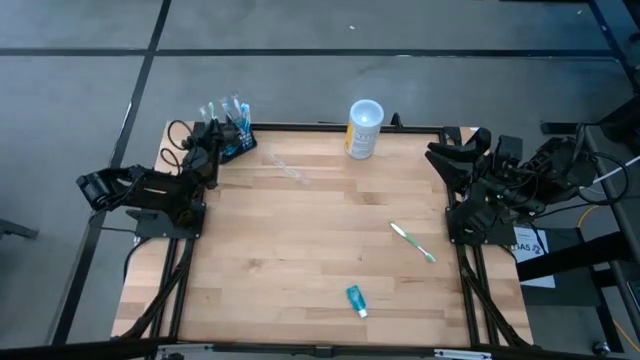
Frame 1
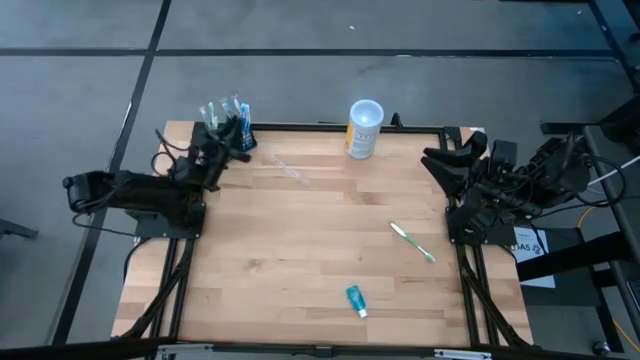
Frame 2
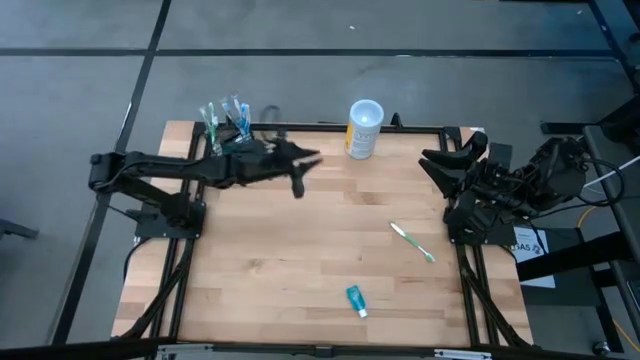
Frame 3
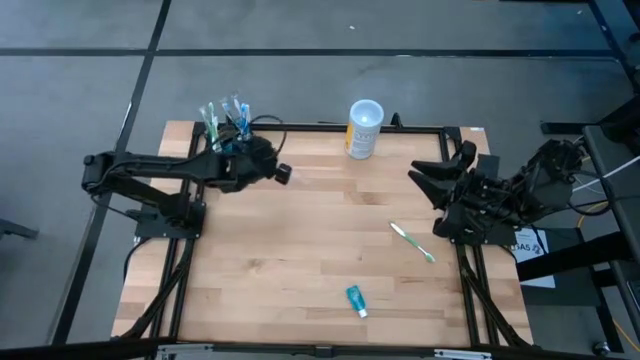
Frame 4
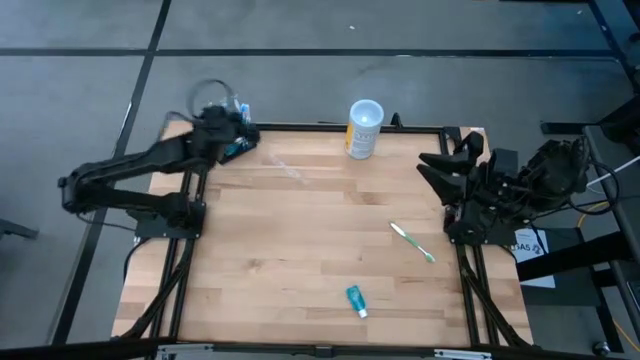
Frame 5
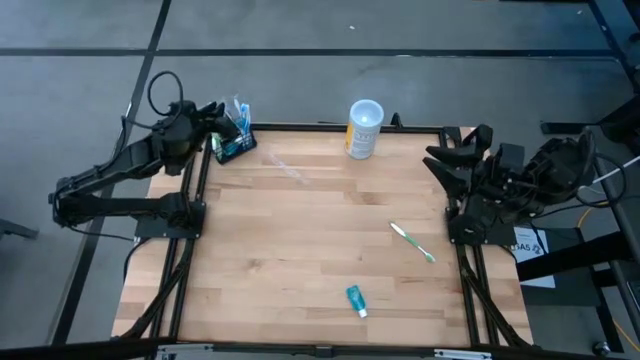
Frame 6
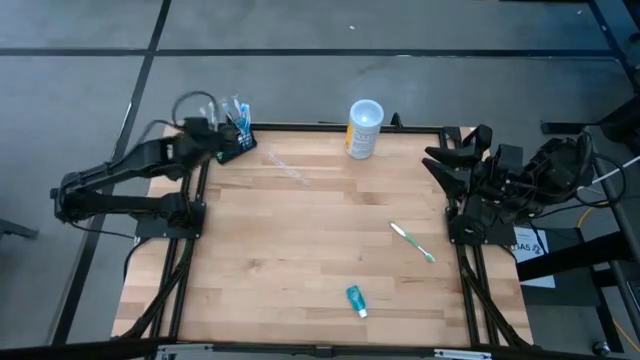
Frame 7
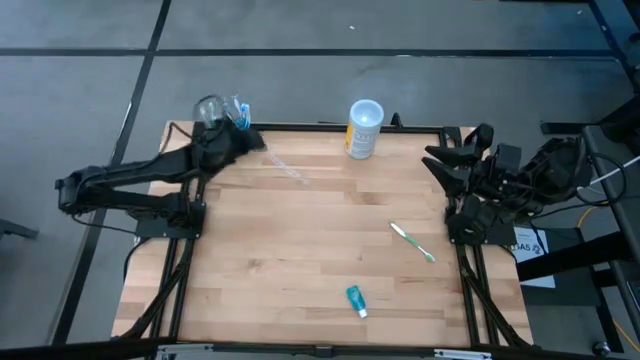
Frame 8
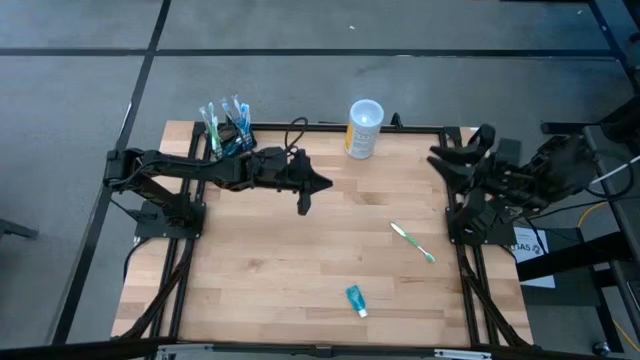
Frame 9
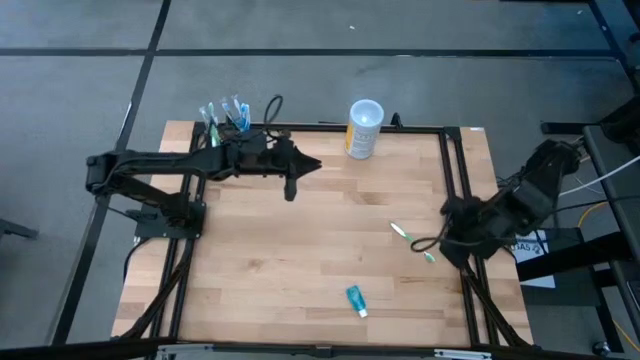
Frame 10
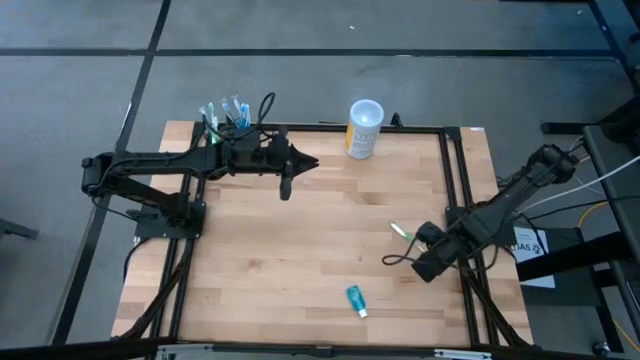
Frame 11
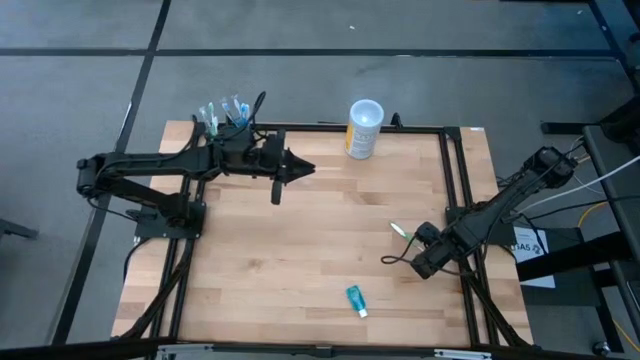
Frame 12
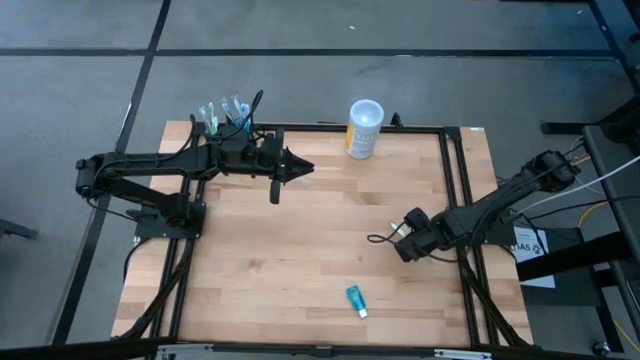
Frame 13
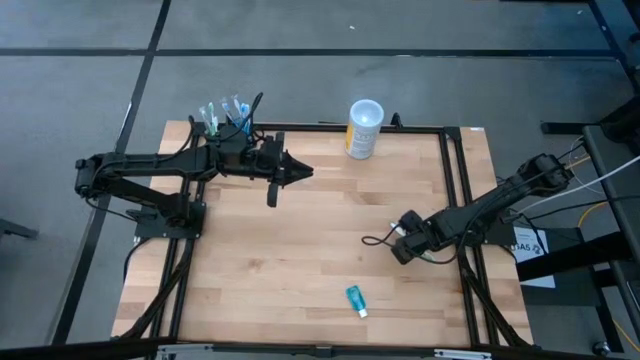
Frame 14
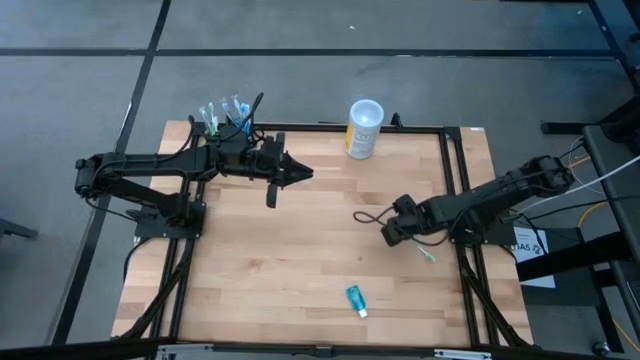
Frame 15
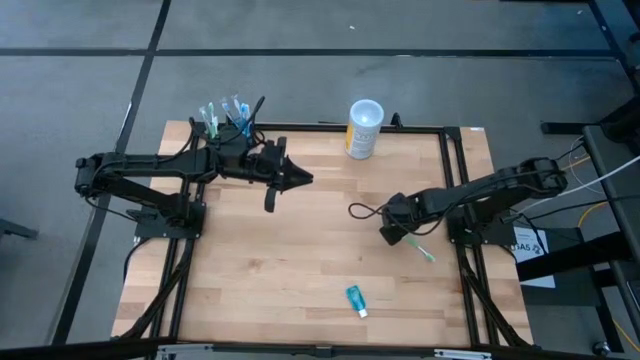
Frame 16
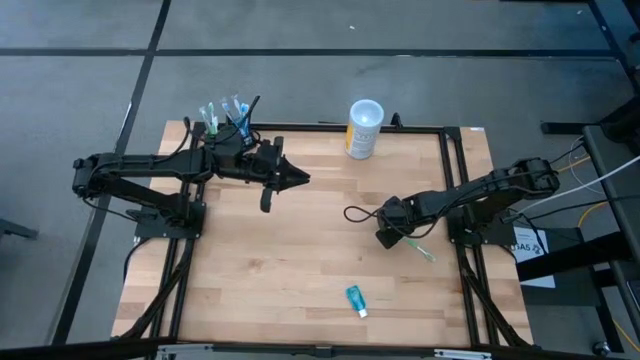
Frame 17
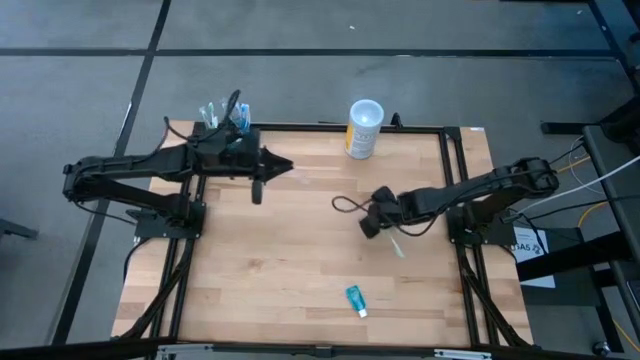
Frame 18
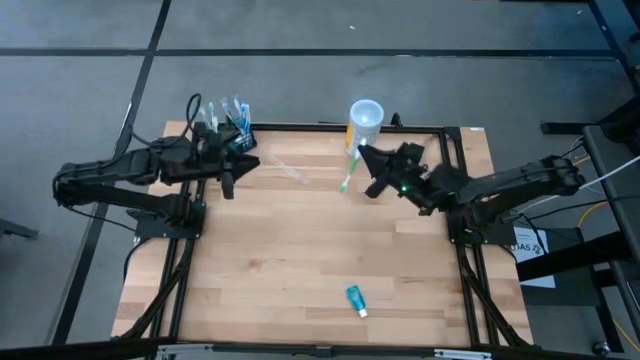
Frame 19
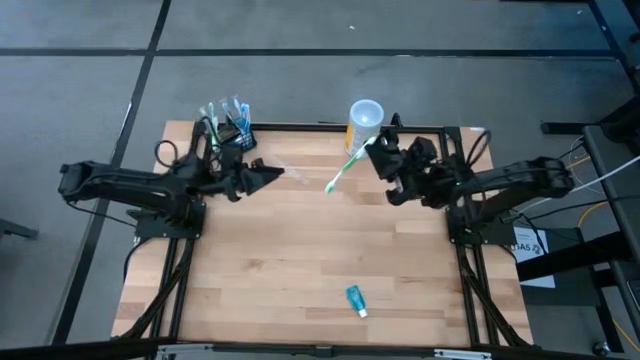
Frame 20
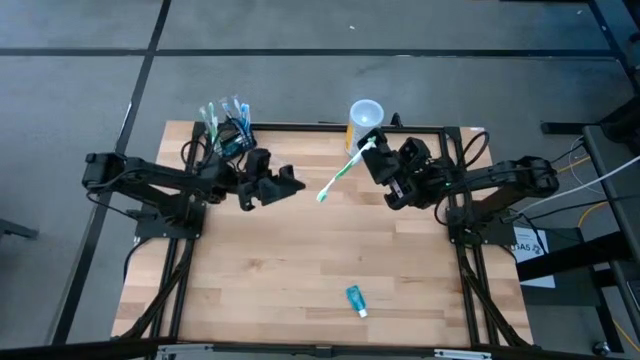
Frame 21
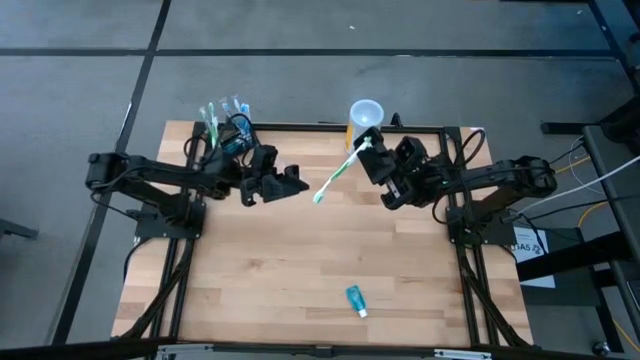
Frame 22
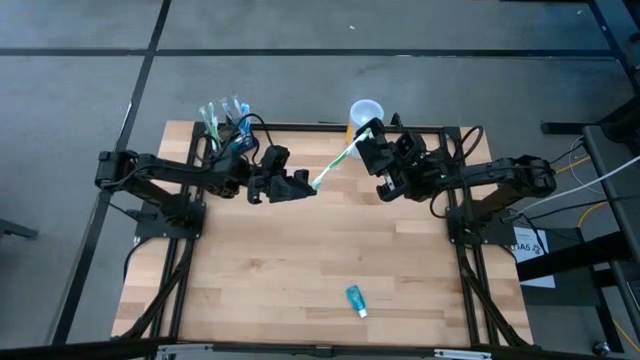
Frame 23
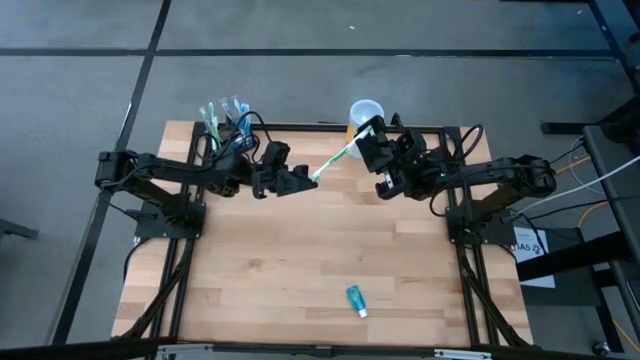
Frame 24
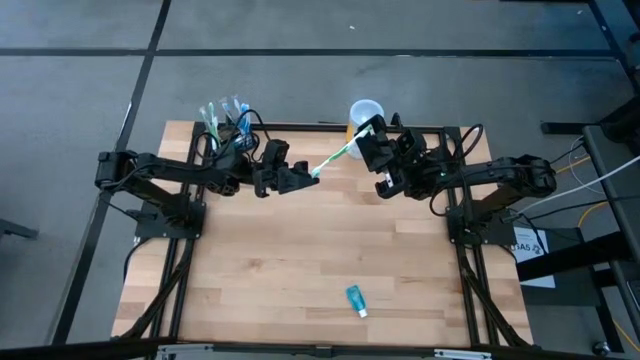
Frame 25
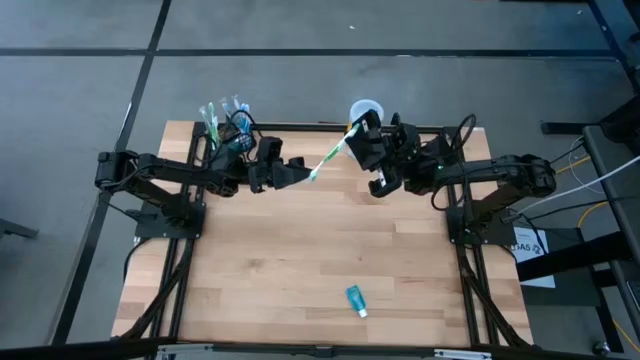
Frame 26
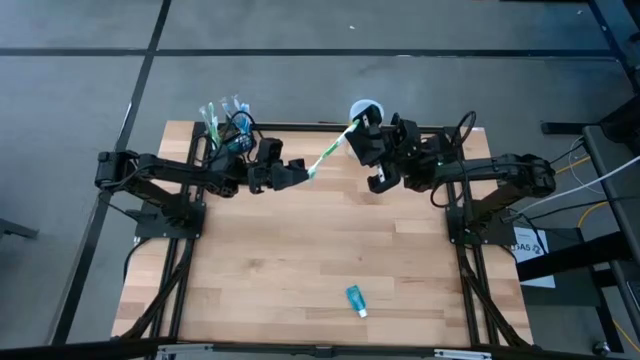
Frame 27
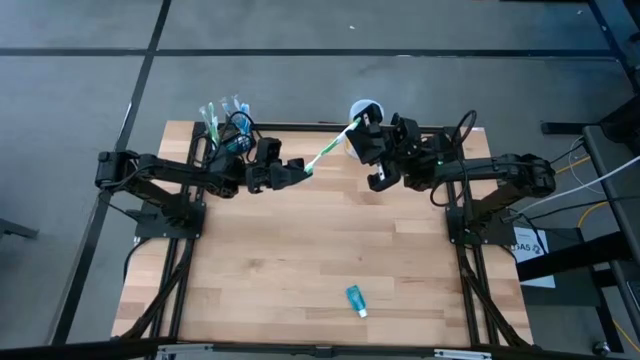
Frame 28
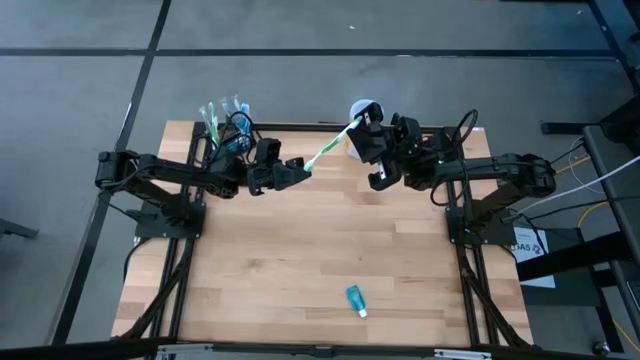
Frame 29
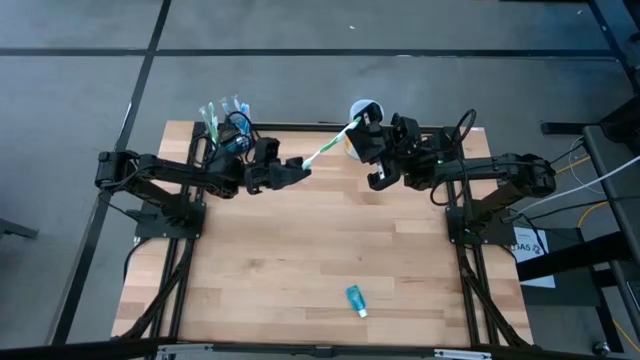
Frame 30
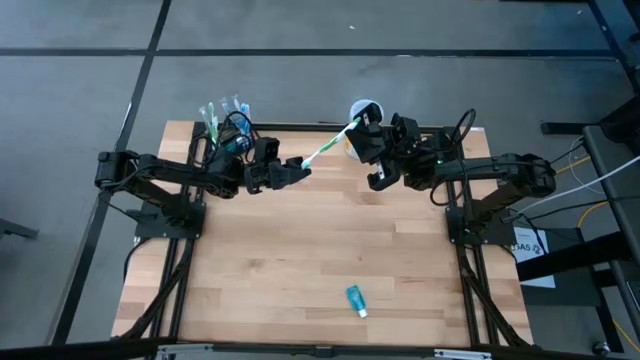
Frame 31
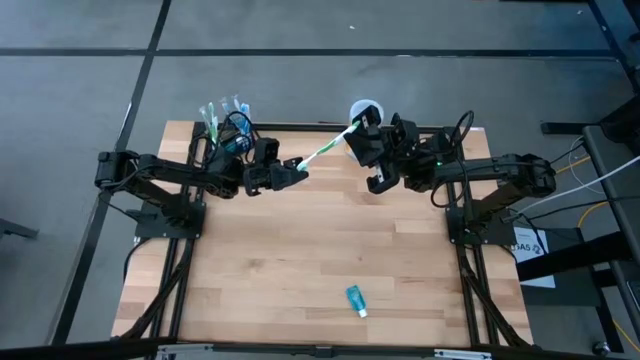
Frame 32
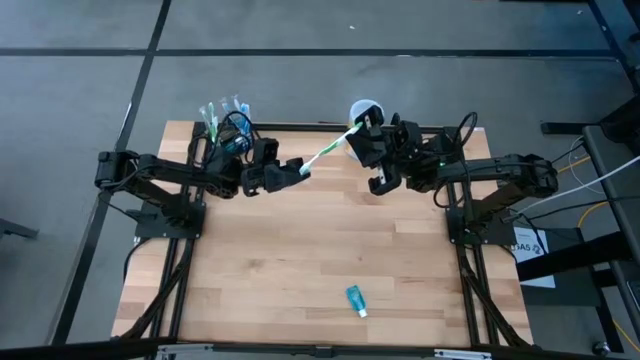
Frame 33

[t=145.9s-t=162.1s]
Task: Pick & Place toothbrushing station
Put the green toothbrush into the left section of the black organizer

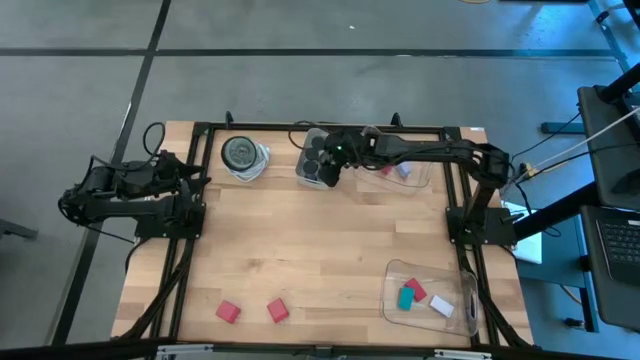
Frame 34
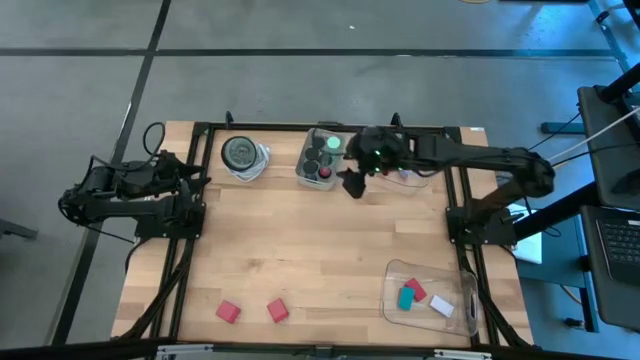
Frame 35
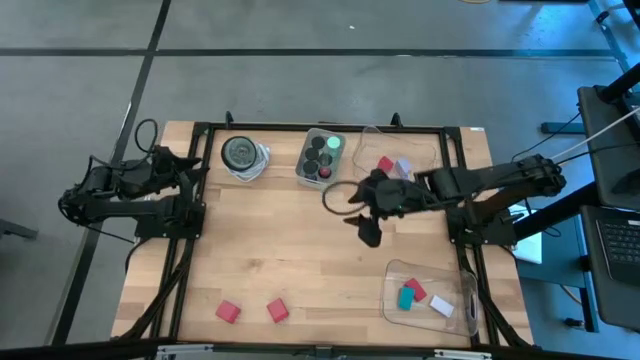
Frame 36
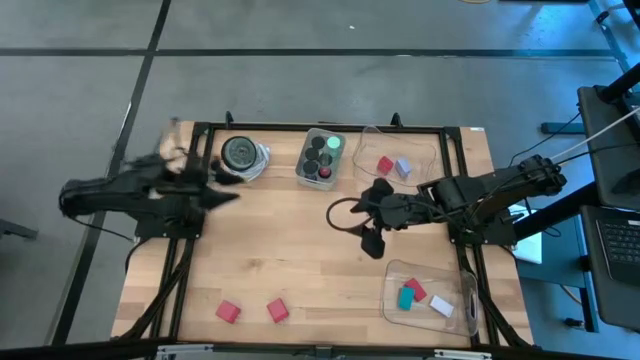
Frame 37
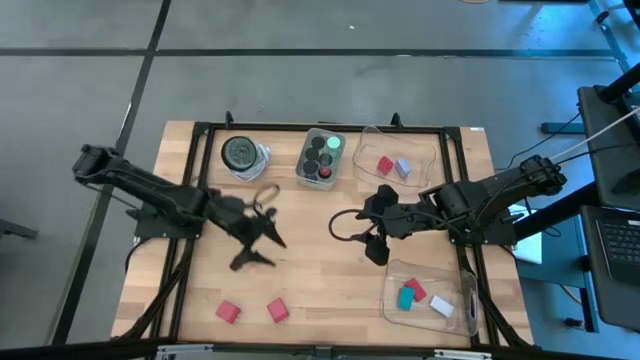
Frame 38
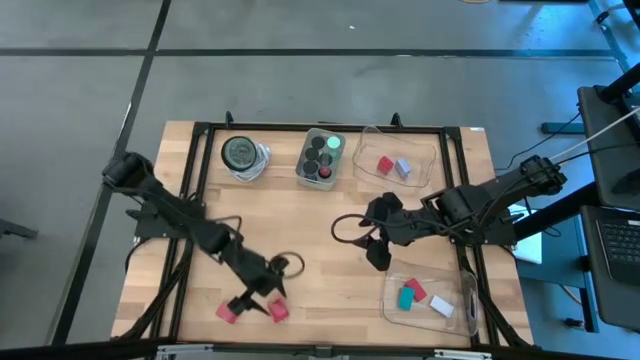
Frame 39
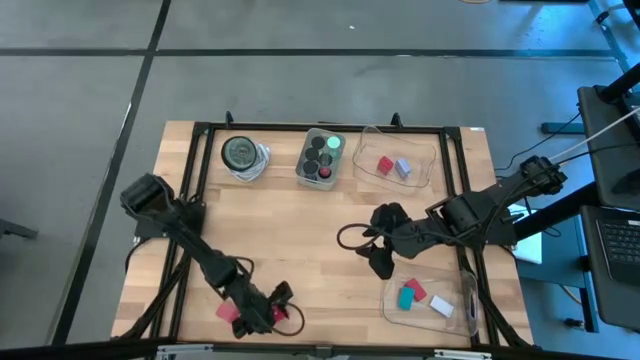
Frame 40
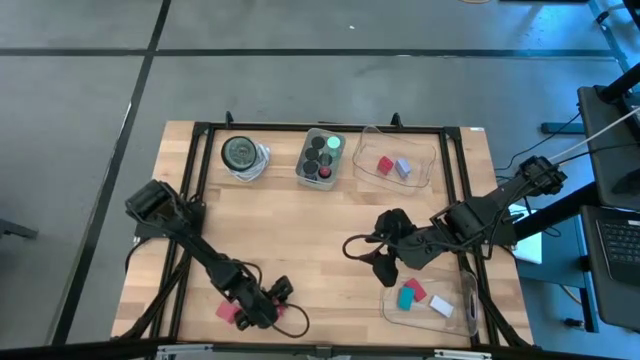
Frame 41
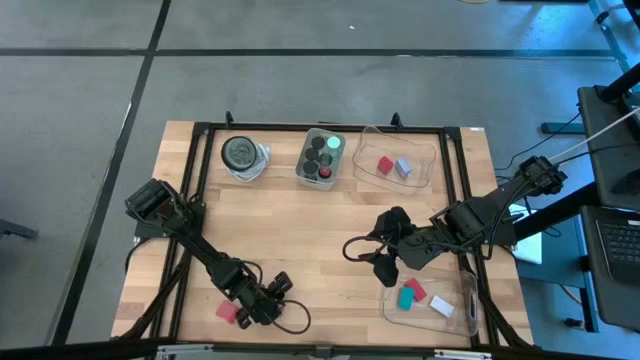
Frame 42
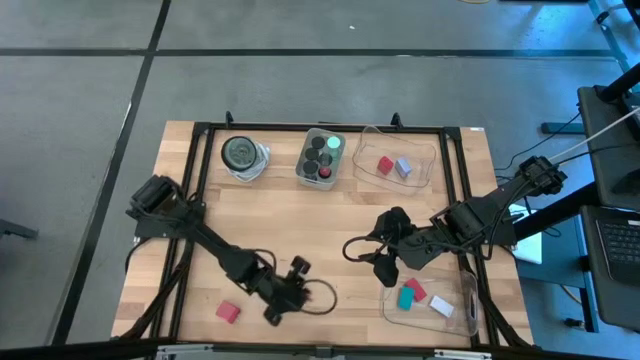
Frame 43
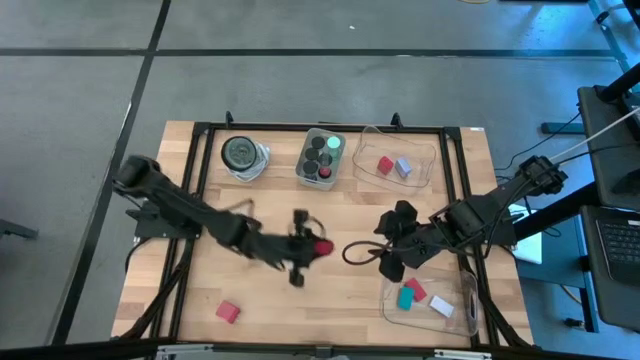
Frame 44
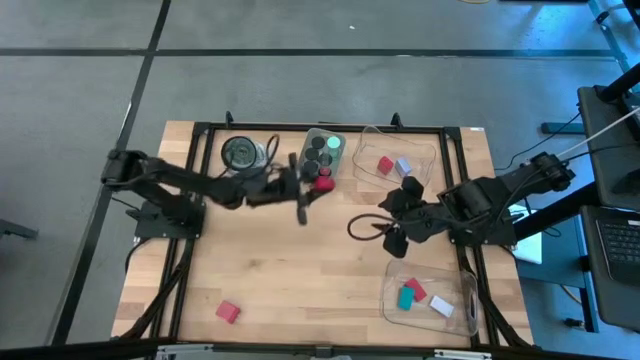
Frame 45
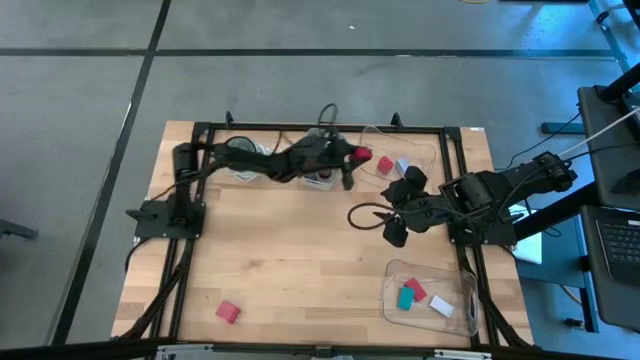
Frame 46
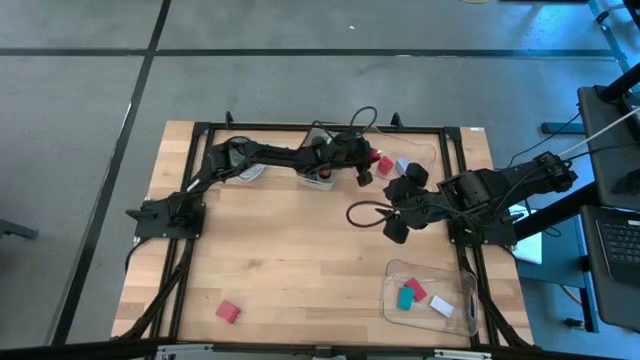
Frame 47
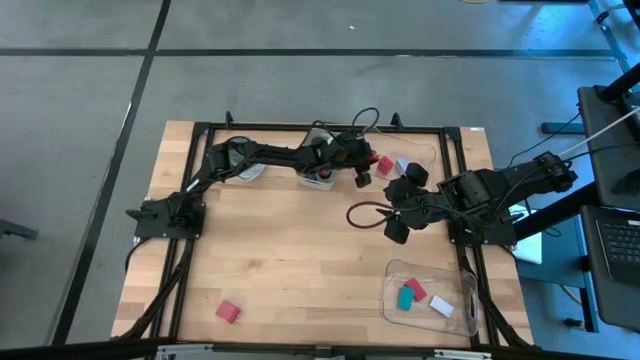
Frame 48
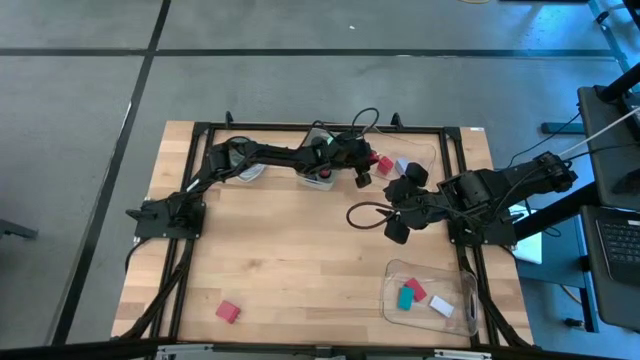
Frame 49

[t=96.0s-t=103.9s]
Task: Pick & Place Office items
Put the right red charger adapter into the top transparent bin
